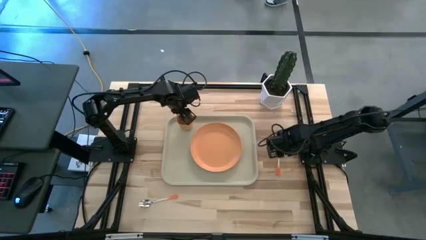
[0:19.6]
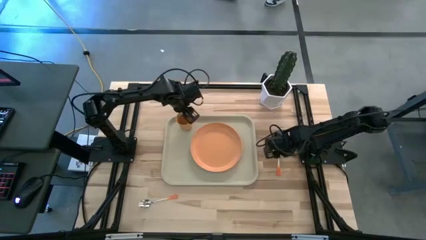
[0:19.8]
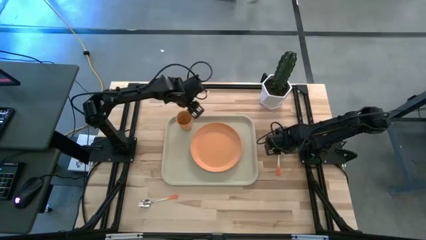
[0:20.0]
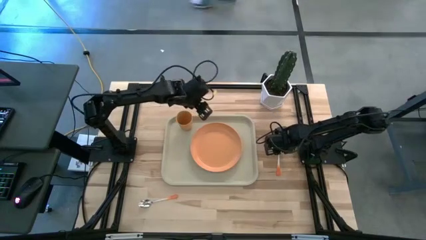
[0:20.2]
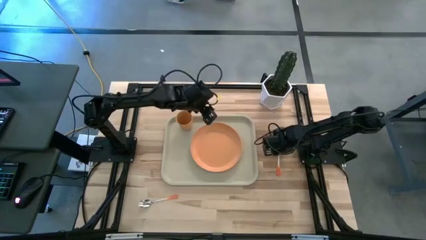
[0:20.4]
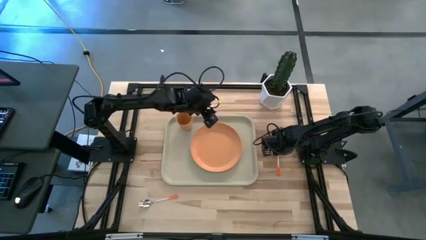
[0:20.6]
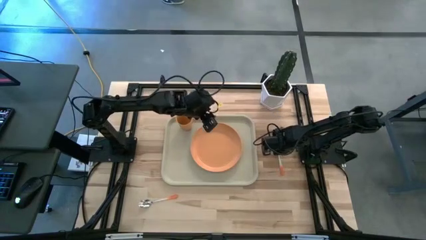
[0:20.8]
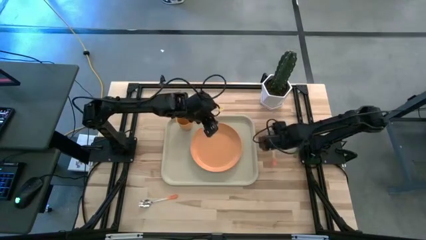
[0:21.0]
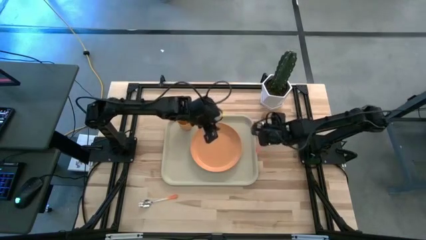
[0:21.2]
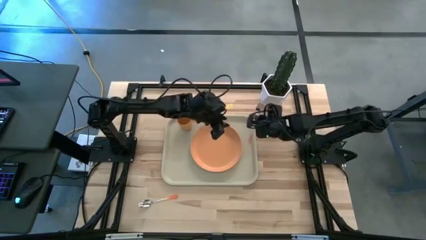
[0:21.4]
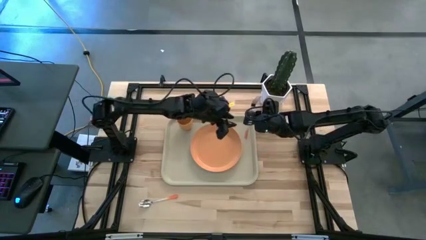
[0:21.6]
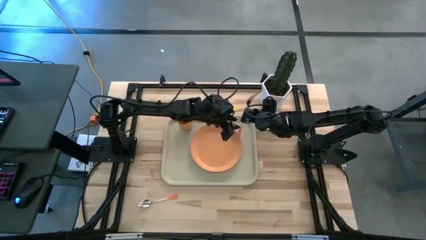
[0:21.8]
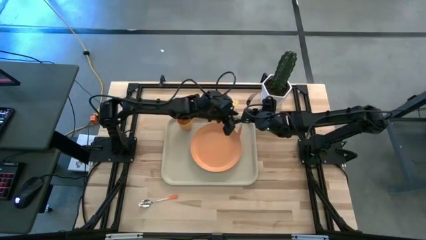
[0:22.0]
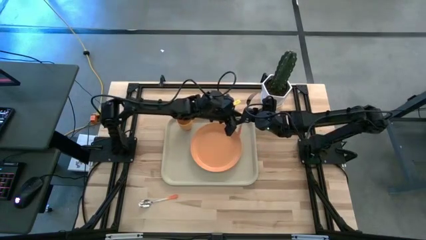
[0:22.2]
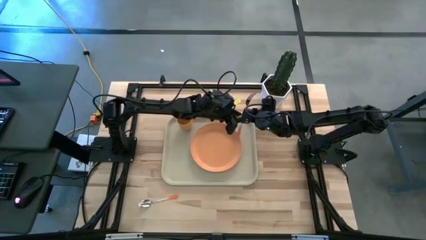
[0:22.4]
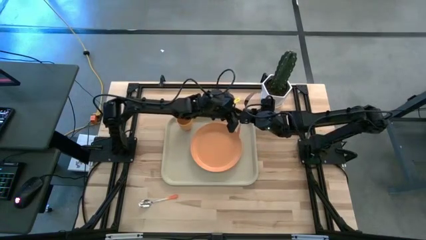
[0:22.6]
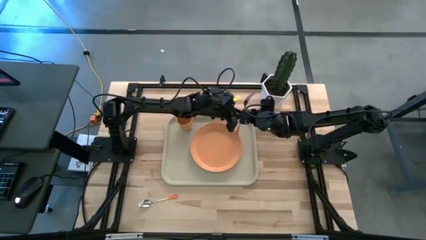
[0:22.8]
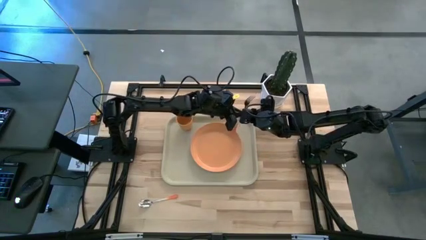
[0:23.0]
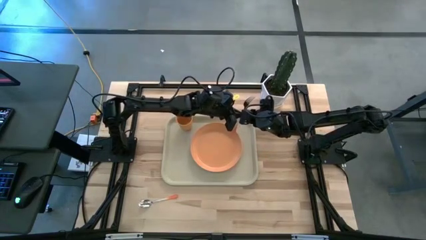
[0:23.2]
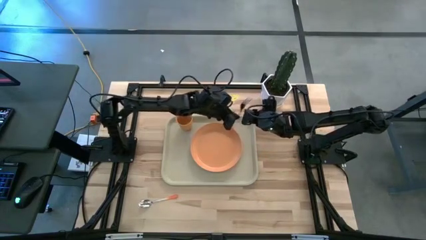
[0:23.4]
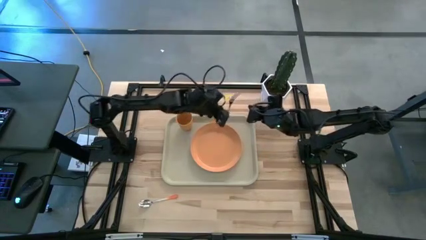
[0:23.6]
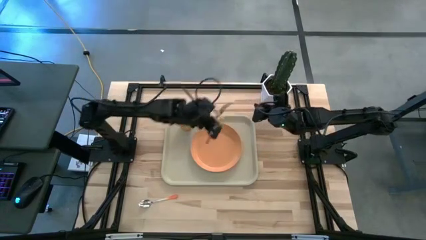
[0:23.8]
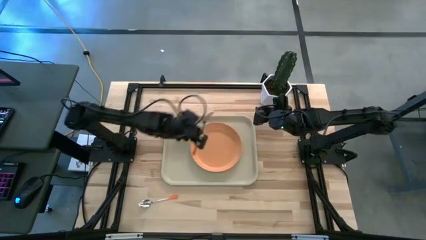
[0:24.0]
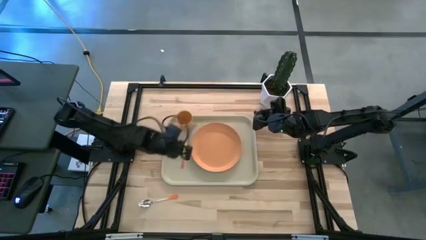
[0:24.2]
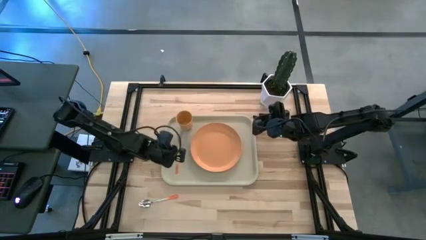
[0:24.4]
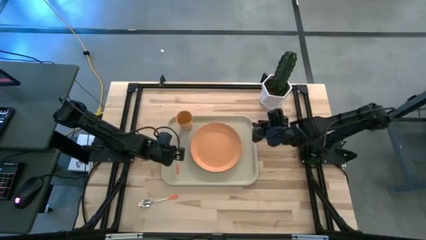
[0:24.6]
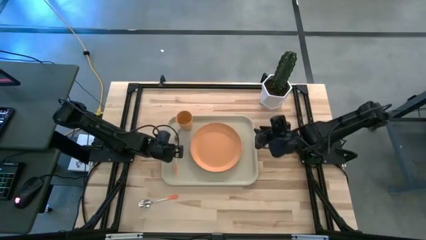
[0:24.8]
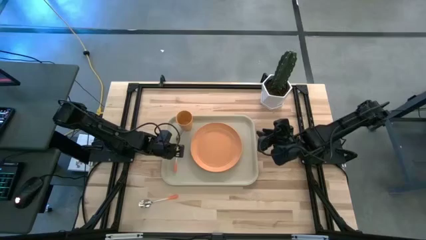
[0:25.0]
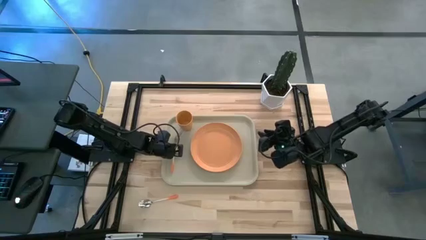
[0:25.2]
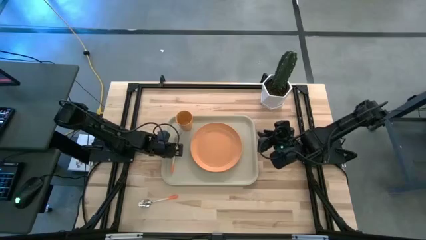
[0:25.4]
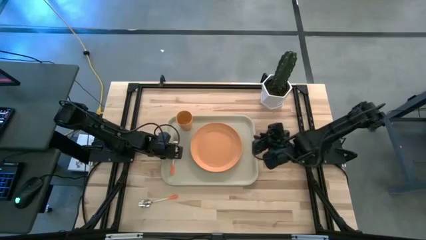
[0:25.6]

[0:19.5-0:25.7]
Task: Pick and place plate/cup/fork/spoon on tray
Put the orange fork on the serving tray to the left of the orange plate

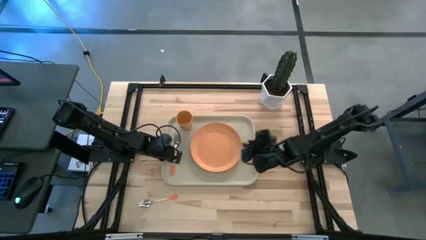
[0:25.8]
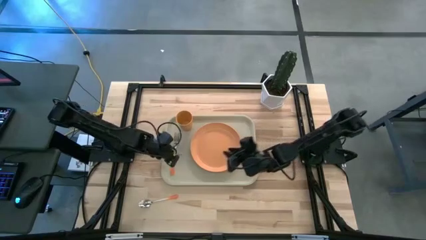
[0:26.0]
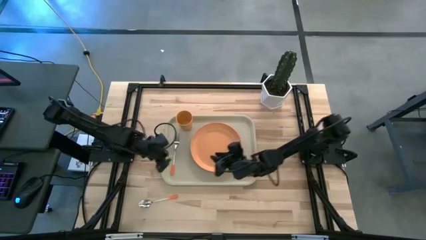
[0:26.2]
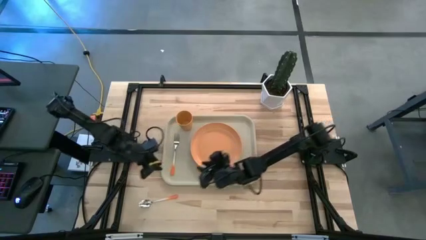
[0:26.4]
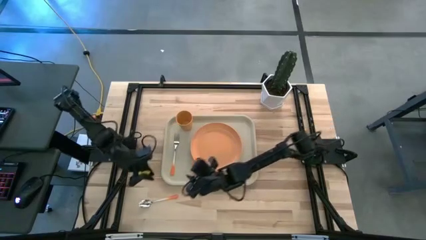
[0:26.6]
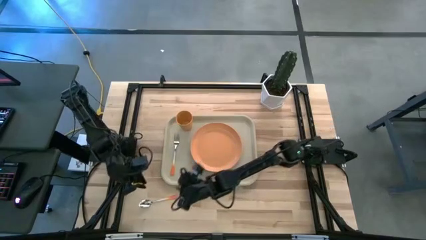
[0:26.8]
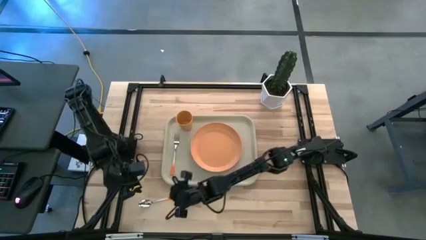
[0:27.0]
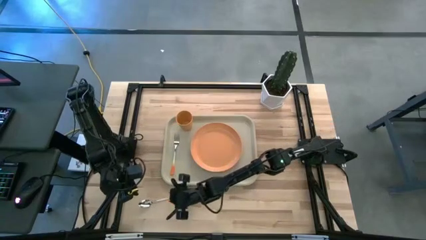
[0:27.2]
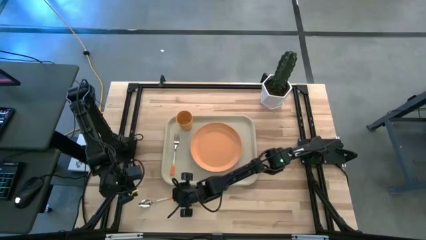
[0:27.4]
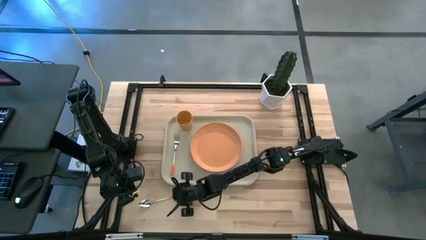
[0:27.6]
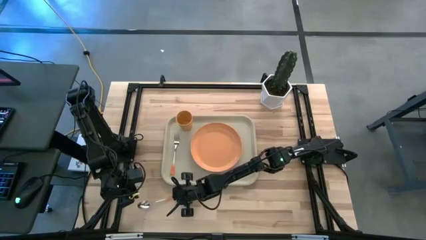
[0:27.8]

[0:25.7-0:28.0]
Adjust the orange spoon

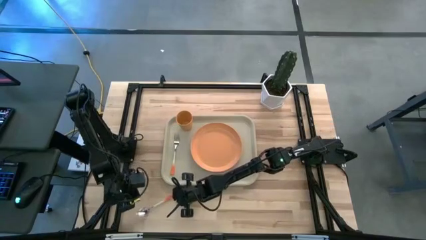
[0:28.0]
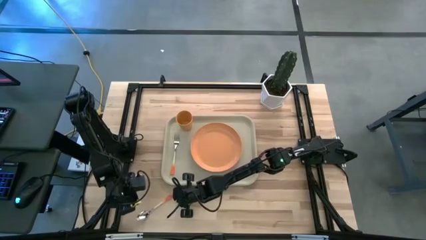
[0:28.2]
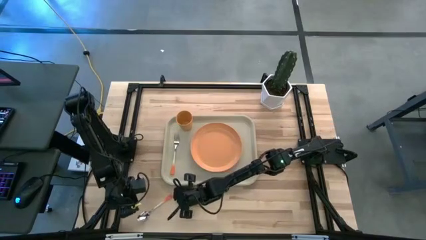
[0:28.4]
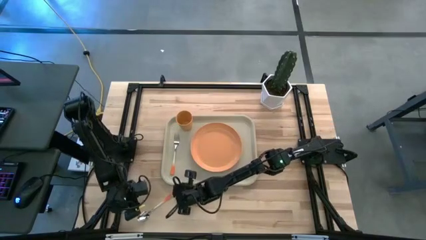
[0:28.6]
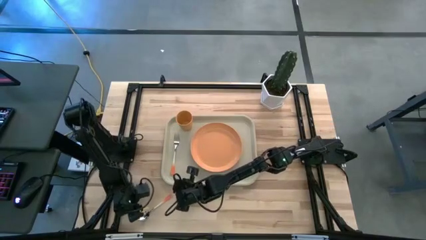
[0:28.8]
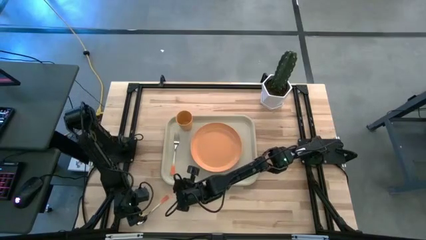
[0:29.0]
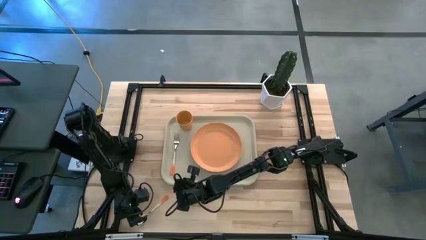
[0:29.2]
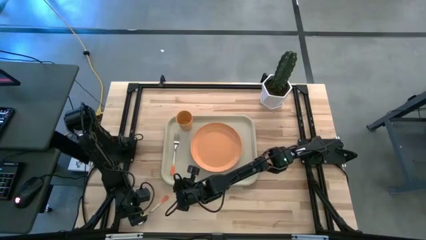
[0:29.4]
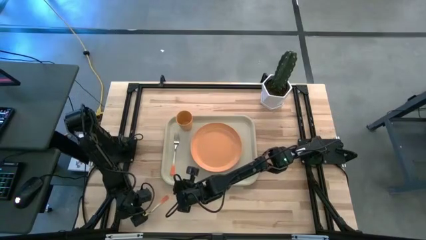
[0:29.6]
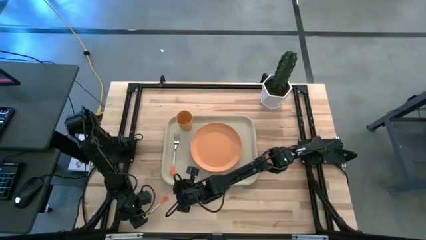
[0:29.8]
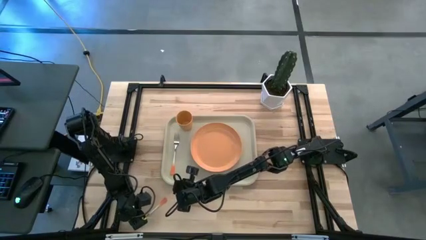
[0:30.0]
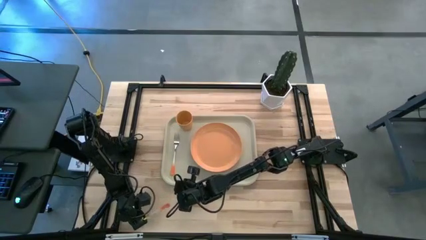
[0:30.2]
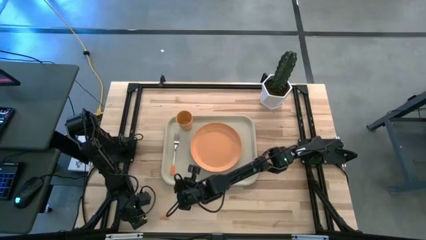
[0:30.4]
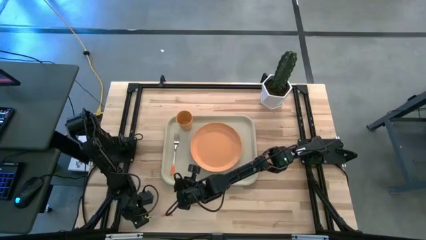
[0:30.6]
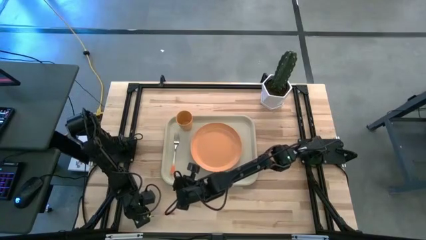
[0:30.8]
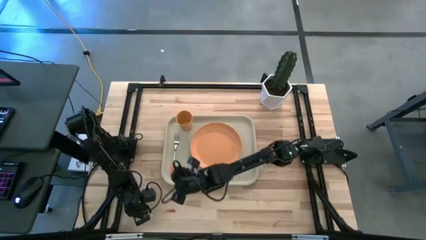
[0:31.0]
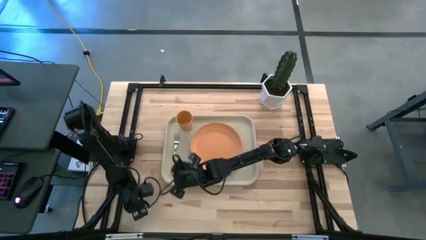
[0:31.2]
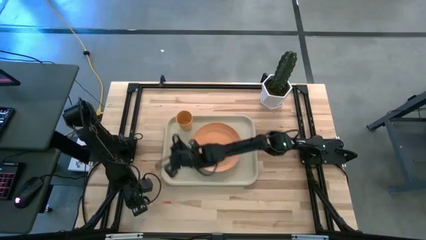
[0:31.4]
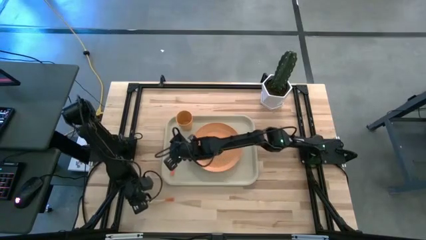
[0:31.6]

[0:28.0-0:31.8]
Adjust the orange spoon

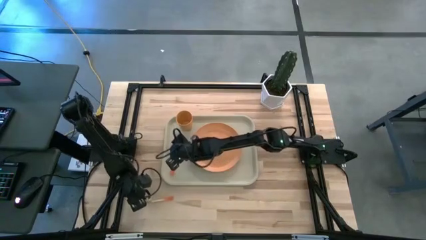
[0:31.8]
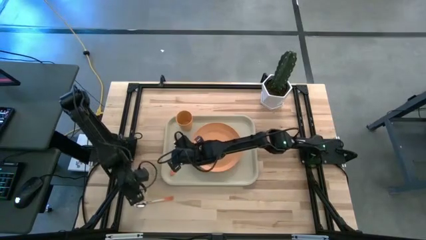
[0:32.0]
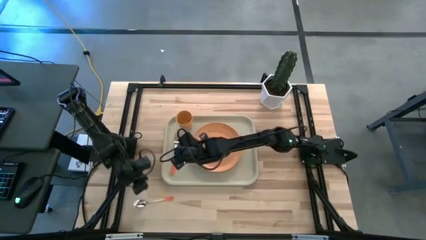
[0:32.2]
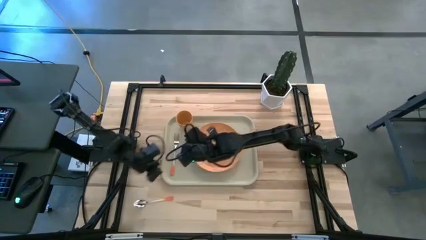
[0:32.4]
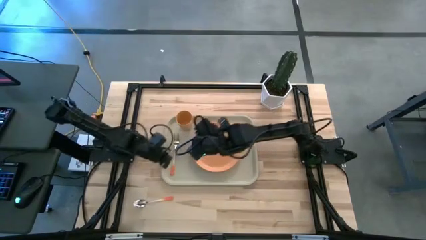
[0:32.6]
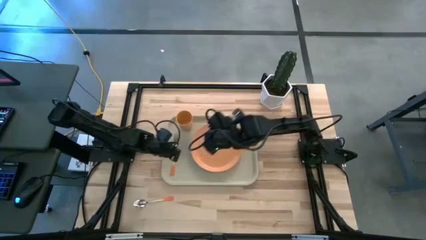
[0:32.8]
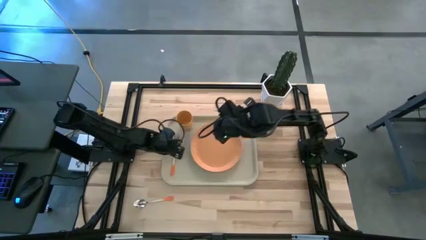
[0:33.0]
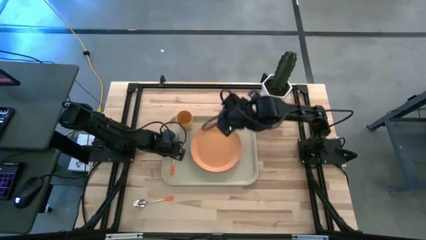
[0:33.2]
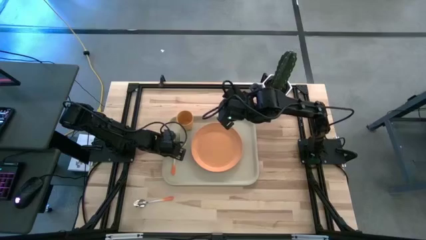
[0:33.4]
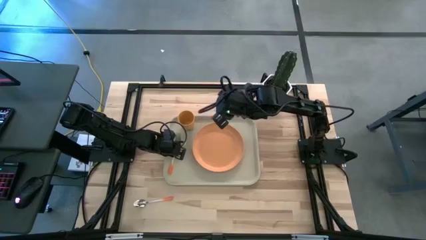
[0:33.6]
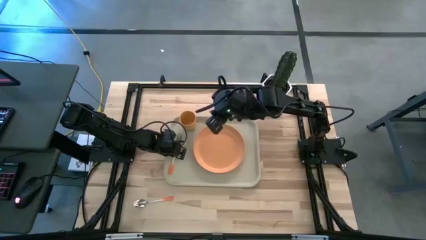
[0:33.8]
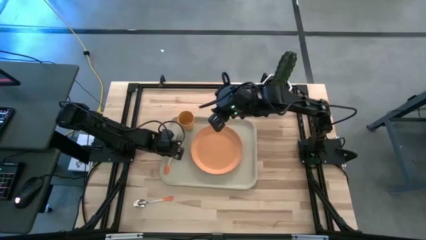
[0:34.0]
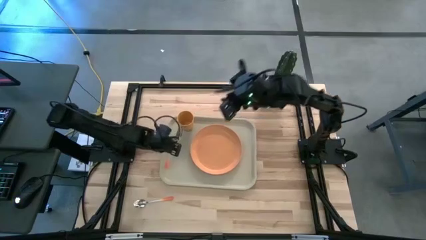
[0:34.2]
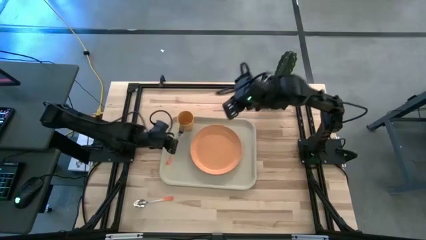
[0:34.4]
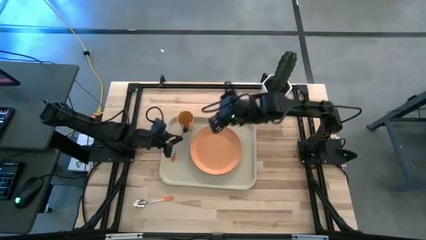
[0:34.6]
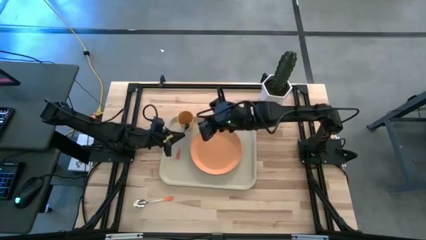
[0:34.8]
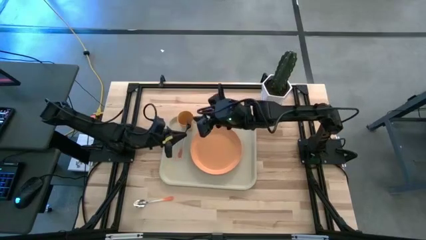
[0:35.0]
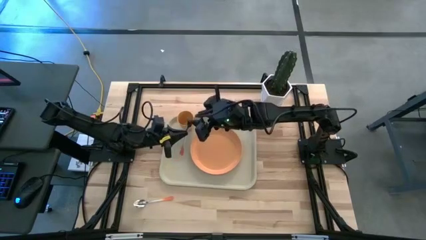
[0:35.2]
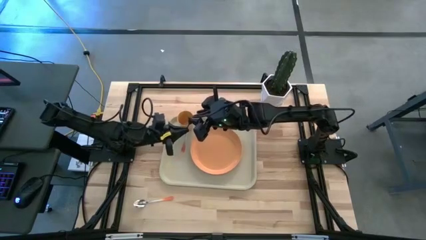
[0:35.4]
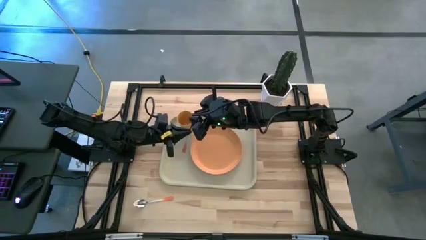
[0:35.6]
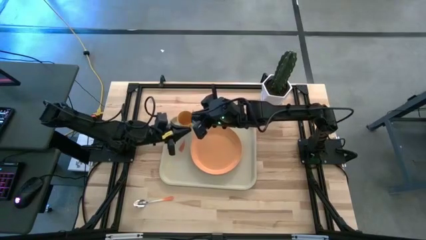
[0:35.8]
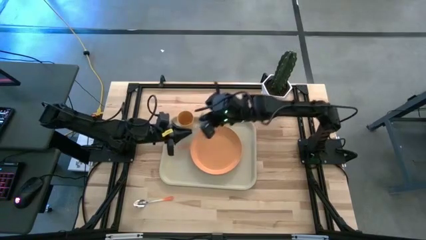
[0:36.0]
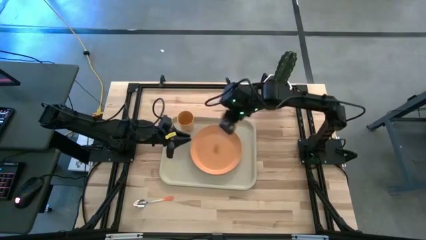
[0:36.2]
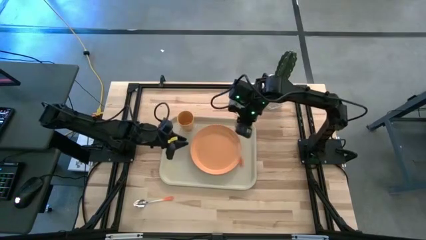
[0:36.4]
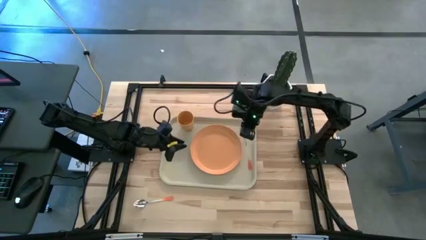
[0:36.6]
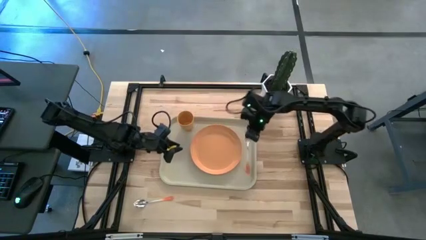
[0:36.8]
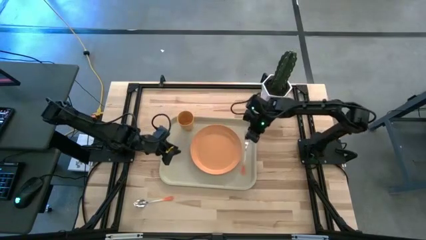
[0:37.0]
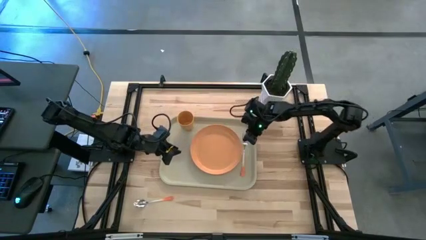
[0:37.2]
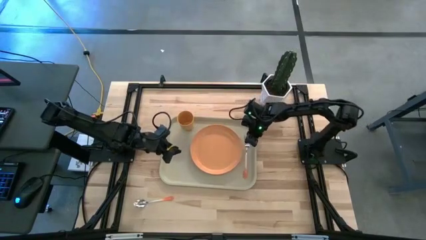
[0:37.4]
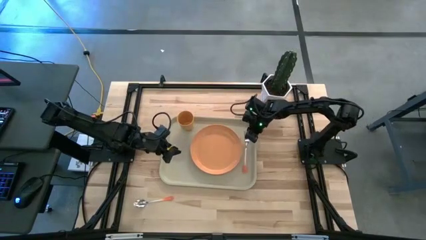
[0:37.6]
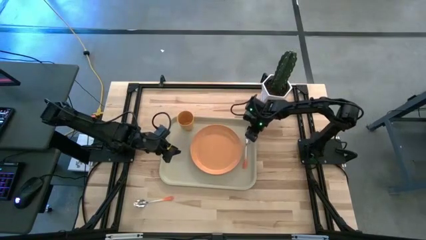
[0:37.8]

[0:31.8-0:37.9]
Move the orange fork on the white serving tray to the right of the orange plate

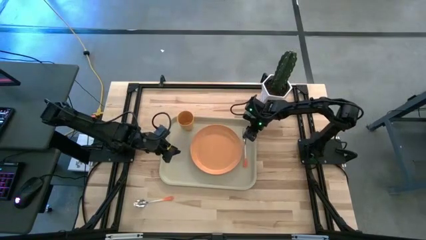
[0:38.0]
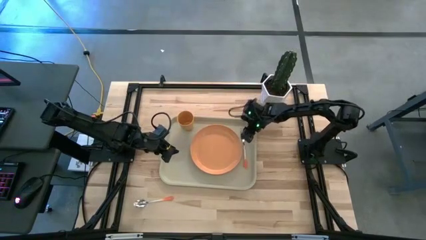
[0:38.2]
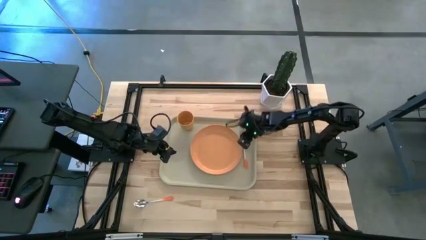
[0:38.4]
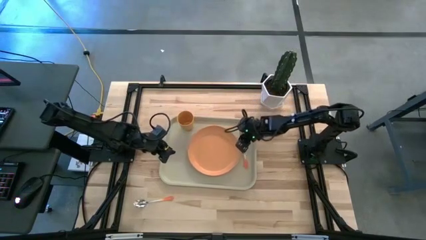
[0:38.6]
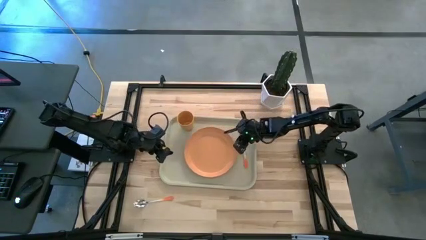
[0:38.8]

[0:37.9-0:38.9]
Adjust the orange plate on the serving tray
